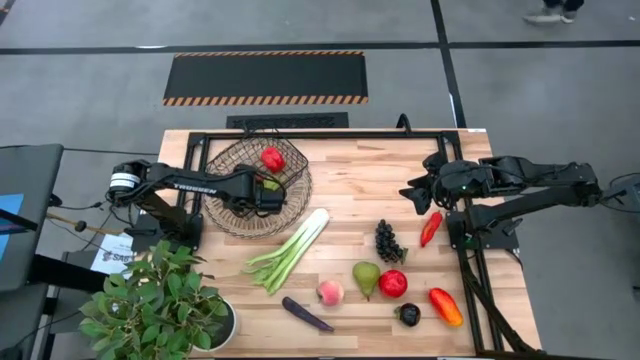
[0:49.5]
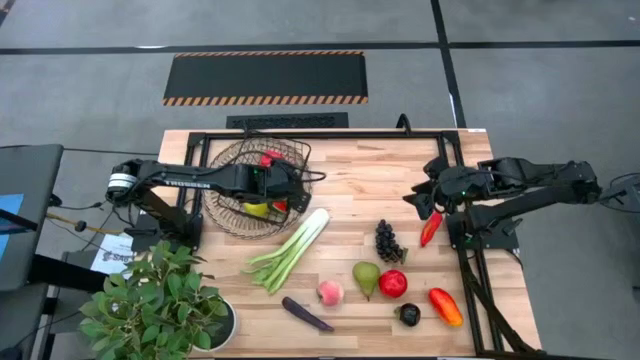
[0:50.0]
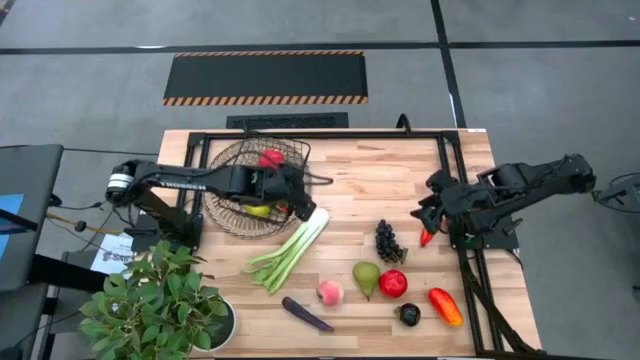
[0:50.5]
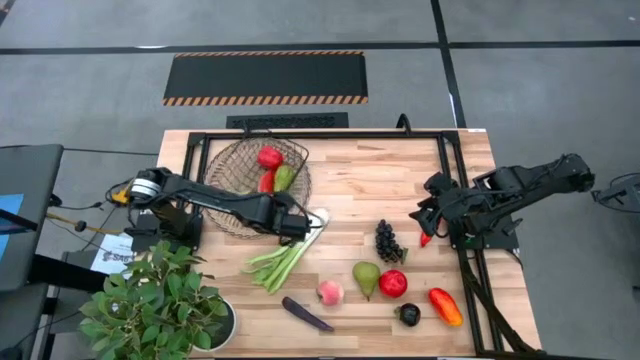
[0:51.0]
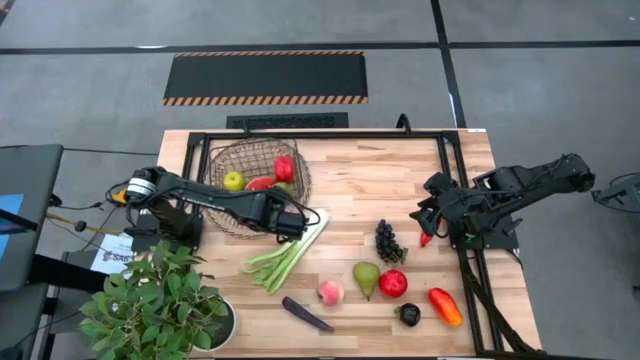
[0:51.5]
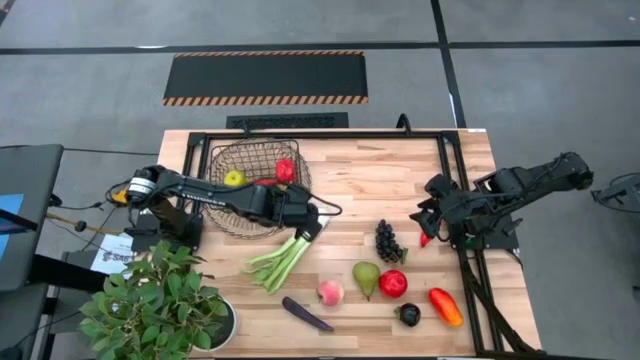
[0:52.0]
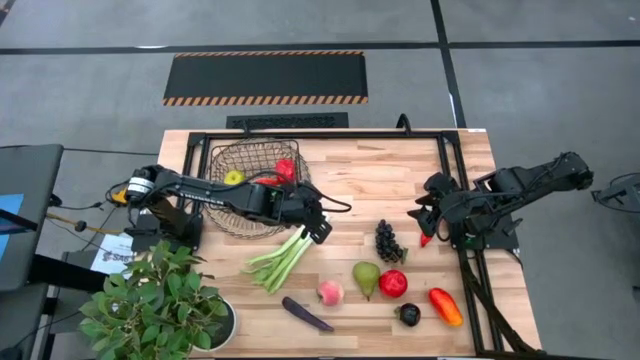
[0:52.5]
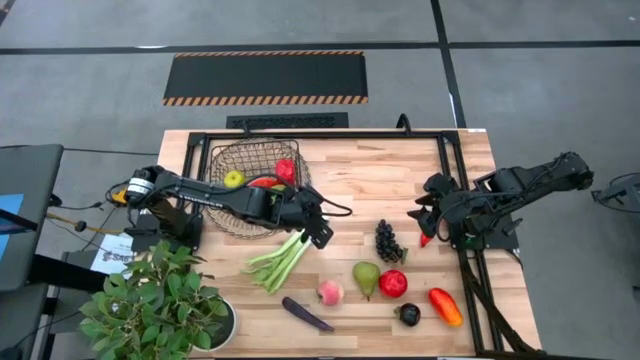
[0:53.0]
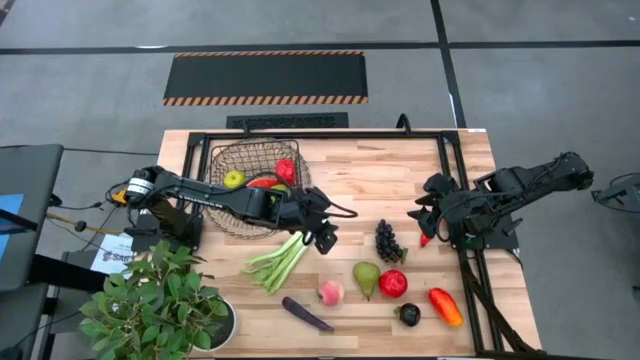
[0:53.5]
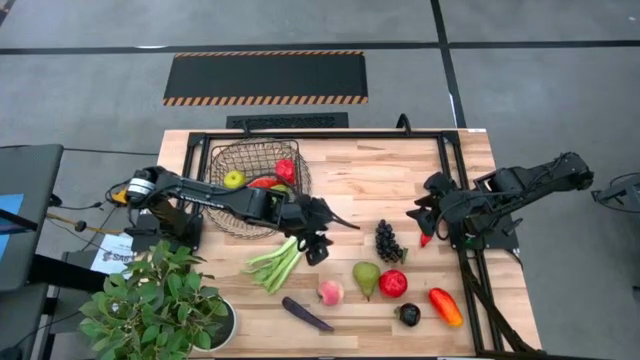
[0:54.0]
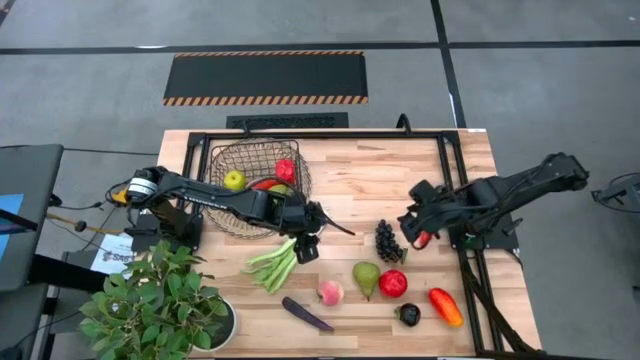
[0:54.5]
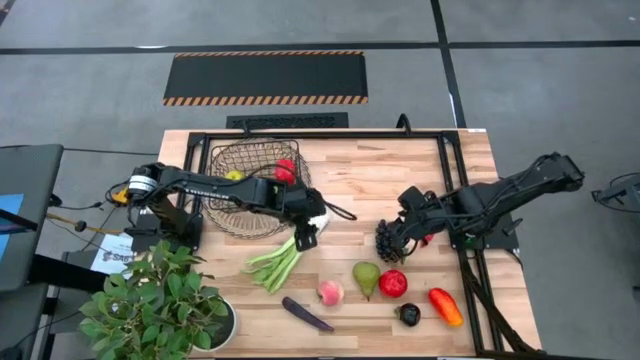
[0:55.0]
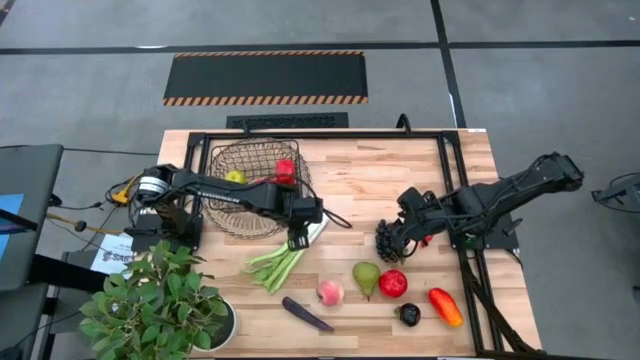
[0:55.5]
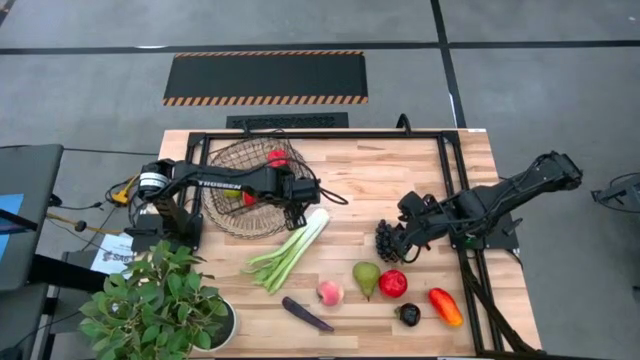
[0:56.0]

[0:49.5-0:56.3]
Task: Build produce basket
Adjust the wire basket on the table

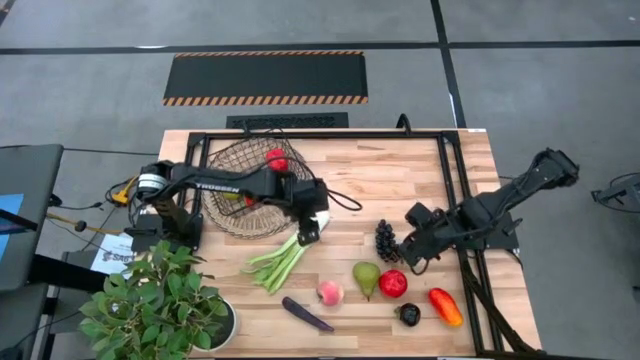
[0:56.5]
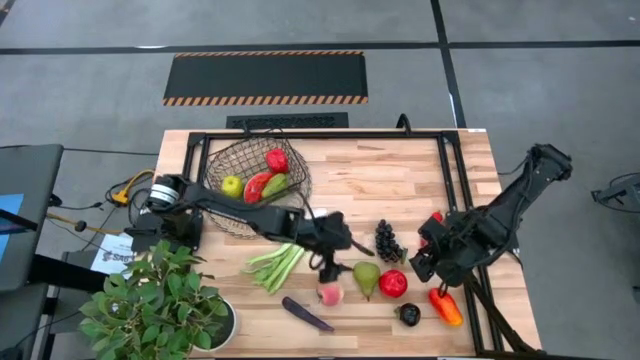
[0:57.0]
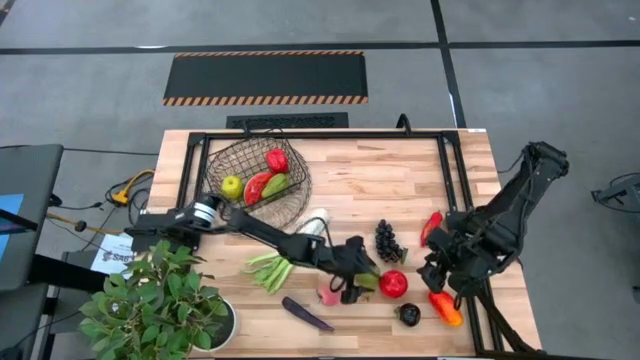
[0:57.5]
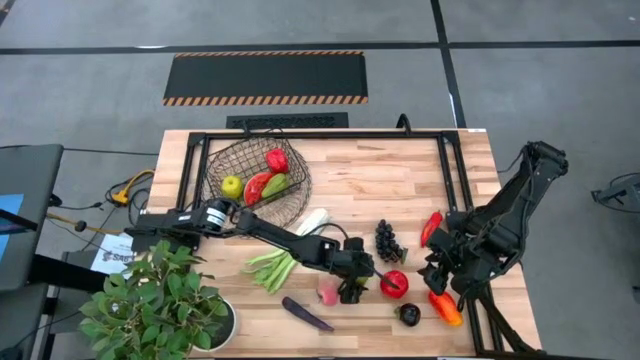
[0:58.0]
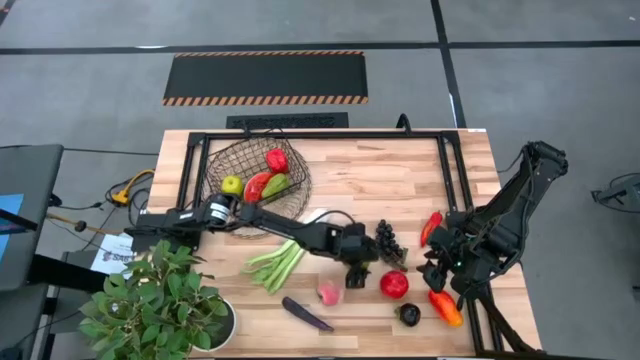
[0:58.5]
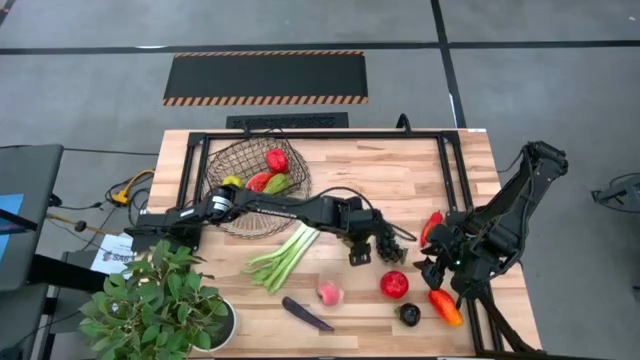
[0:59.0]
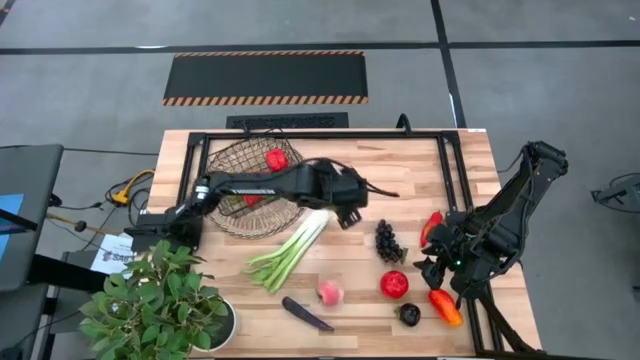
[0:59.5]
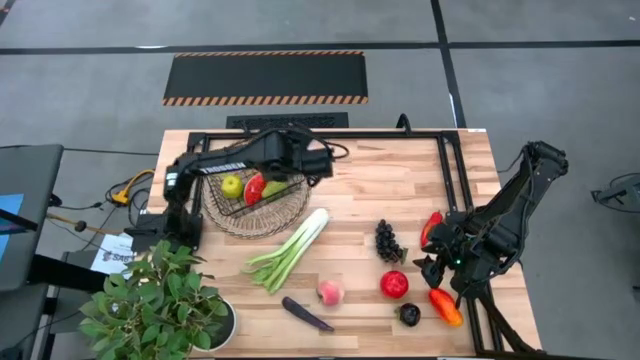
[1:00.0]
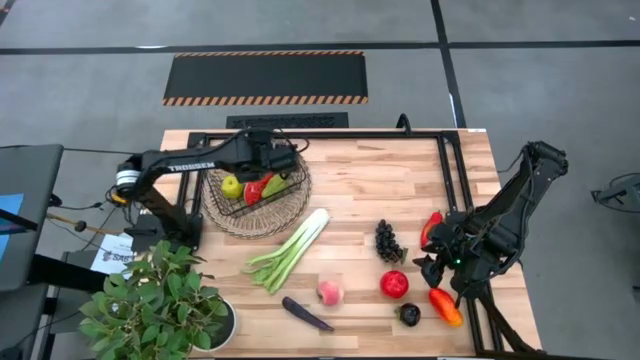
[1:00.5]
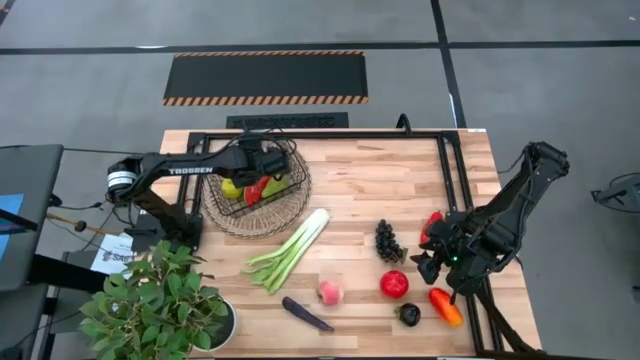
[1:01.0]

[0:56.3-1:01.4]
Put the green pear into the wire basket

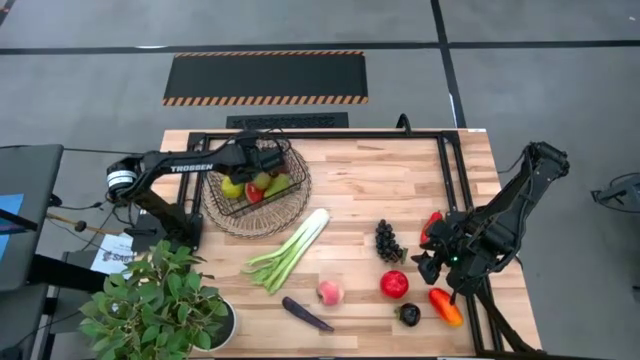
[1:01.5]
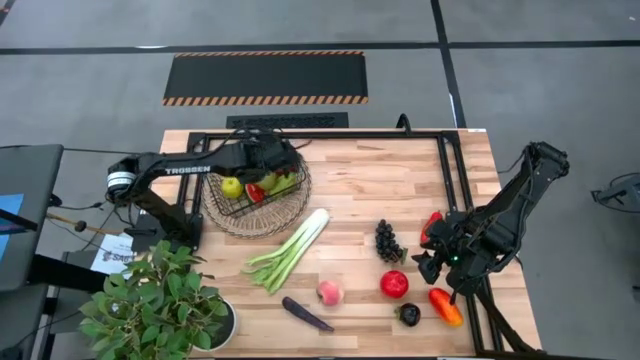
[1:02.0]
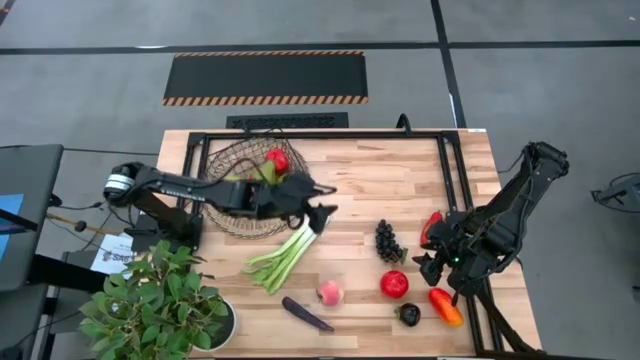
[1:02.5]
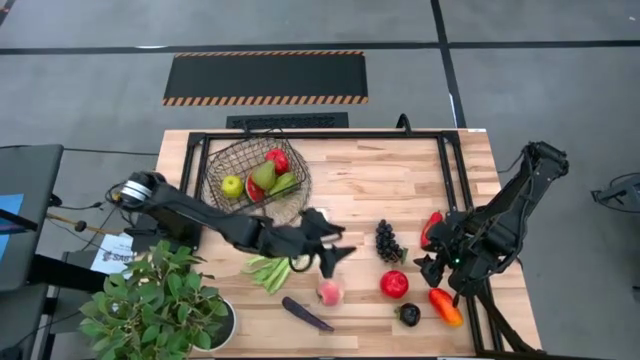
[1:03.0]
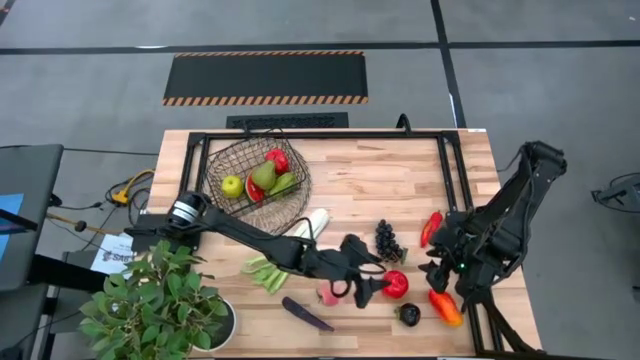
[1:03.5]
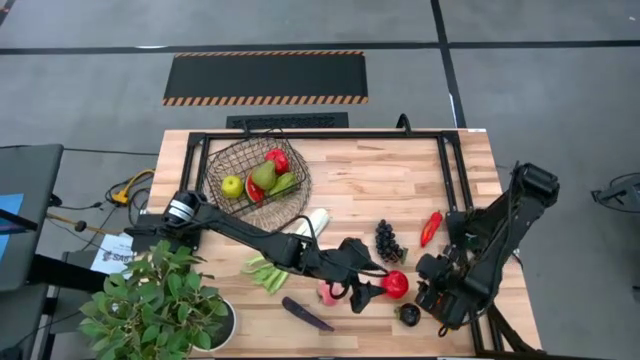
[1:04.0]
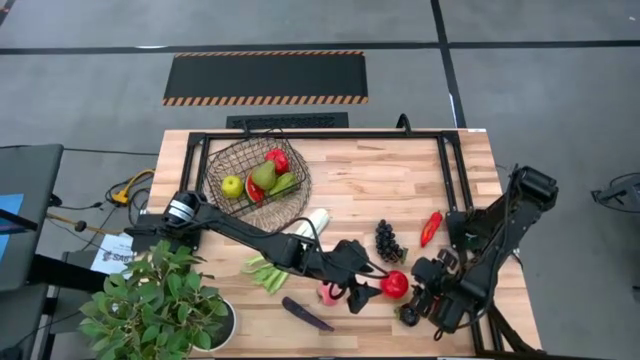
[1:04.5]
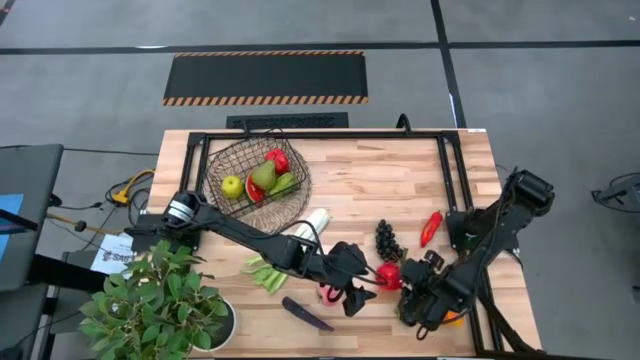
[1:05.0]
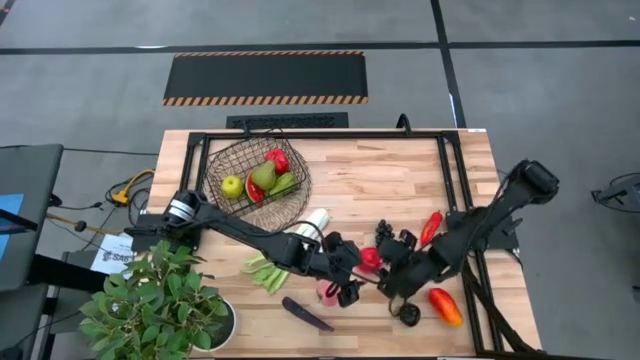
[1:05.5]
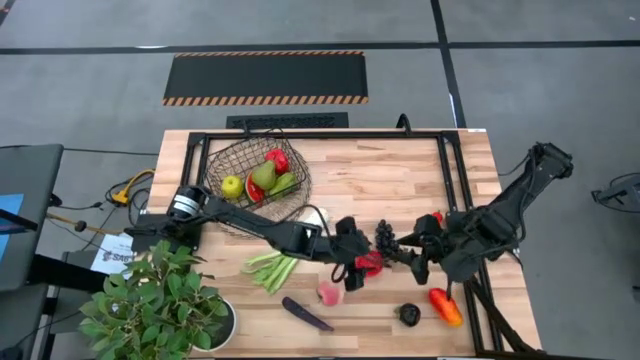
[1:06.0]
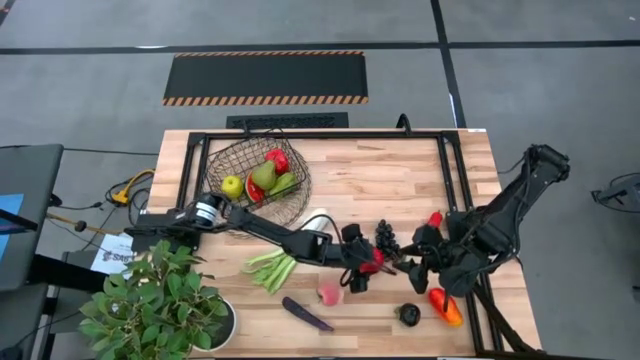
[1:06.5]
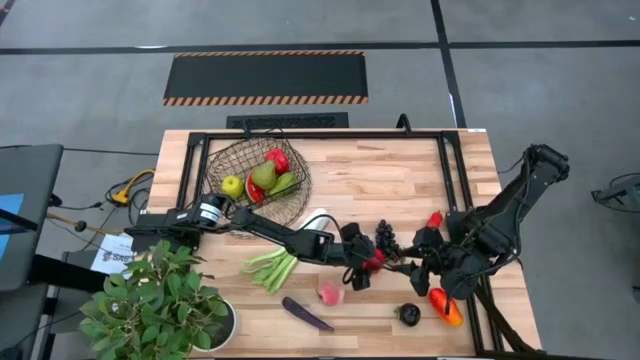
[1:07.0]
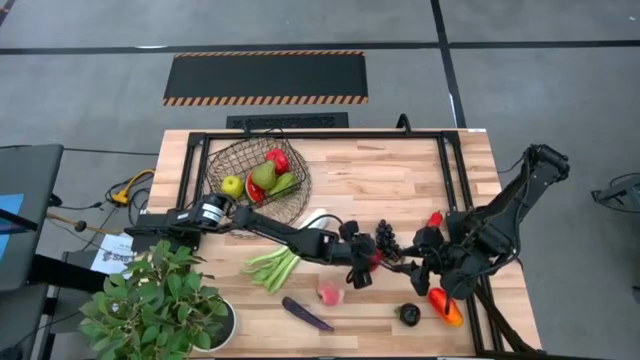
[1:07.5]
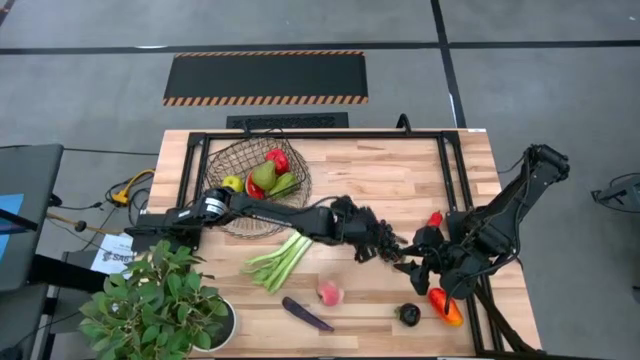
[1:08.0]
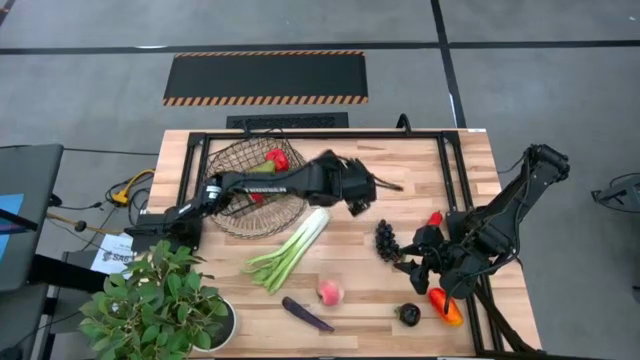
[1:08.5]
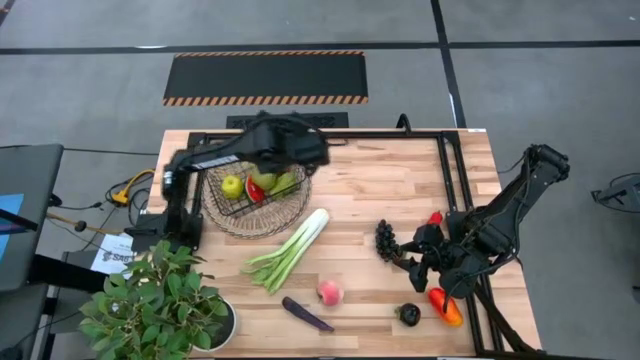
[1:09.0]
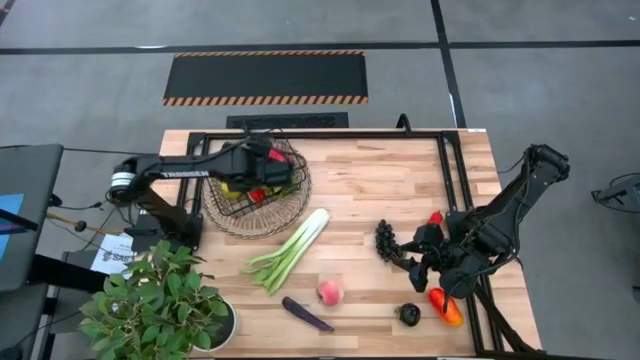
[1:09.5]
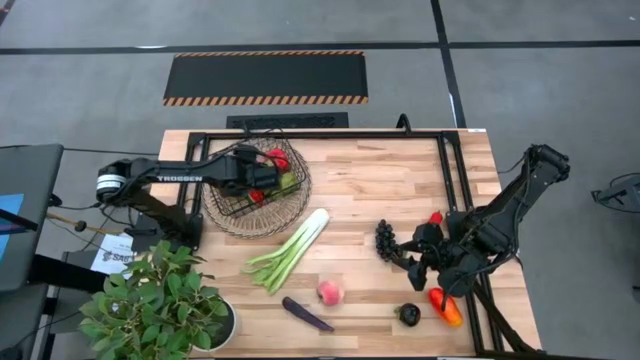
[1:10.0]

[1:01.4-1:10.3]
Put the red apple into the wire basket
